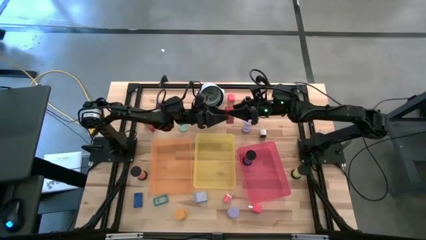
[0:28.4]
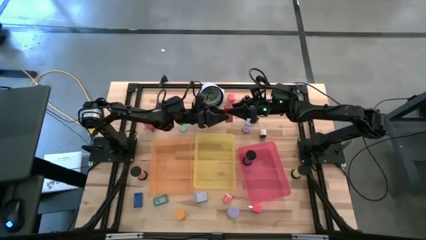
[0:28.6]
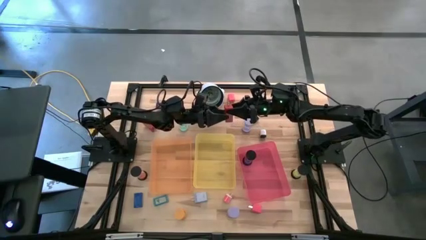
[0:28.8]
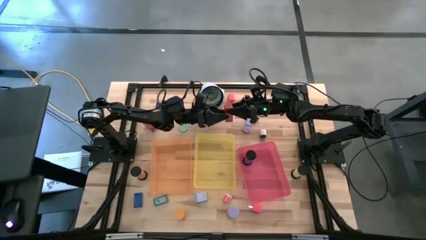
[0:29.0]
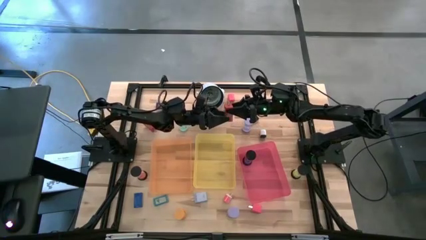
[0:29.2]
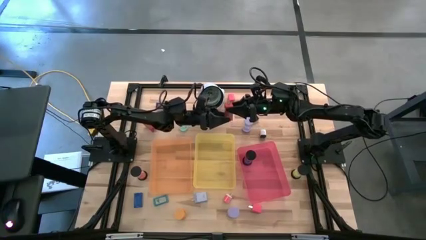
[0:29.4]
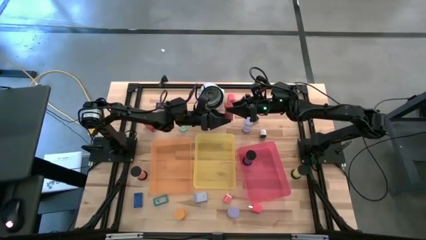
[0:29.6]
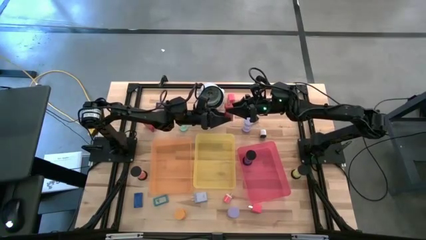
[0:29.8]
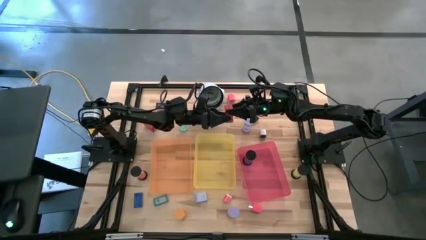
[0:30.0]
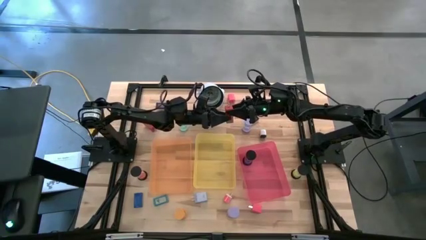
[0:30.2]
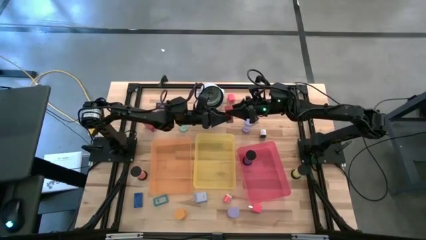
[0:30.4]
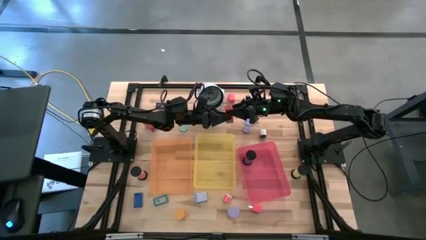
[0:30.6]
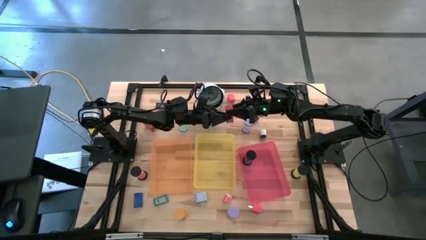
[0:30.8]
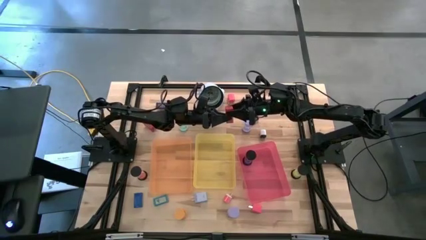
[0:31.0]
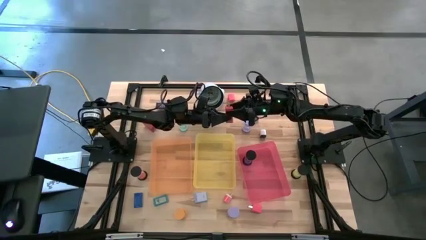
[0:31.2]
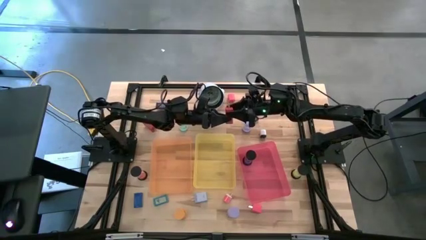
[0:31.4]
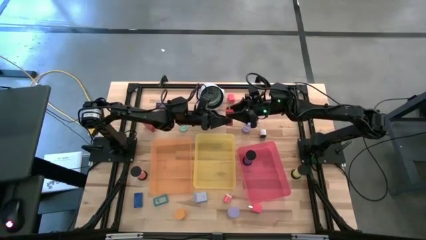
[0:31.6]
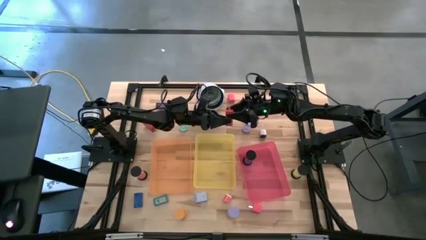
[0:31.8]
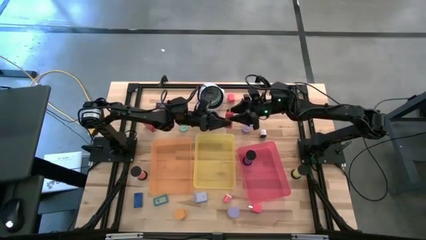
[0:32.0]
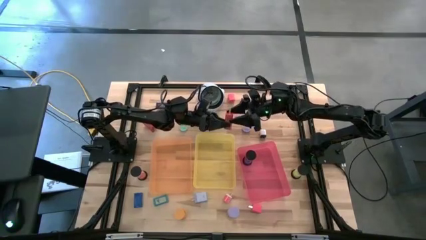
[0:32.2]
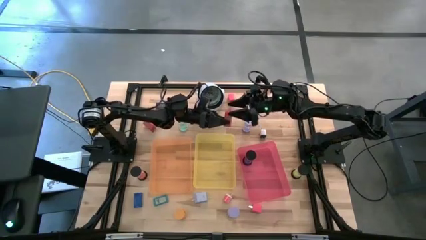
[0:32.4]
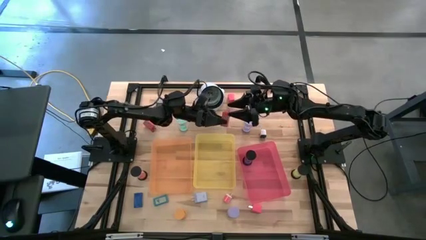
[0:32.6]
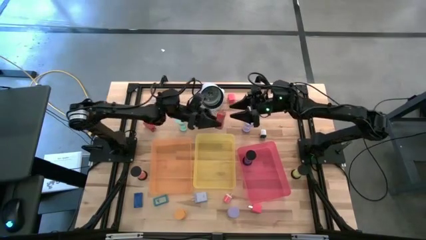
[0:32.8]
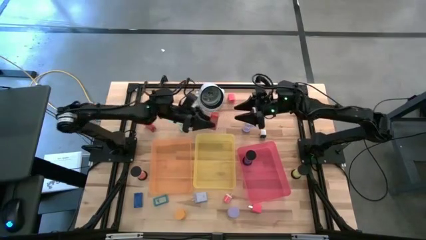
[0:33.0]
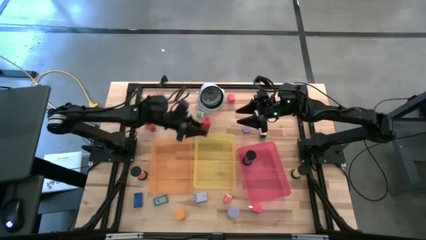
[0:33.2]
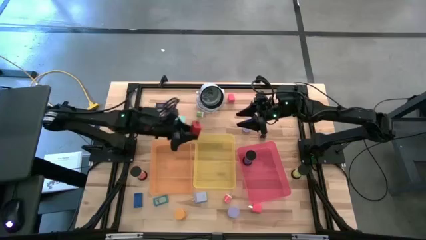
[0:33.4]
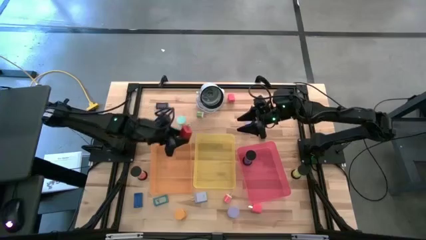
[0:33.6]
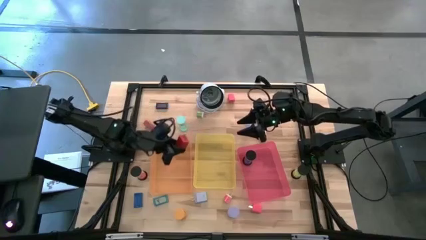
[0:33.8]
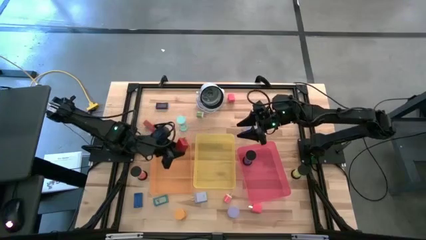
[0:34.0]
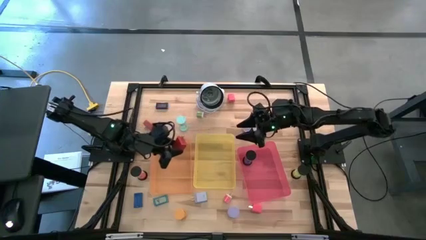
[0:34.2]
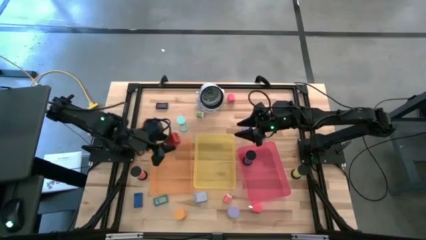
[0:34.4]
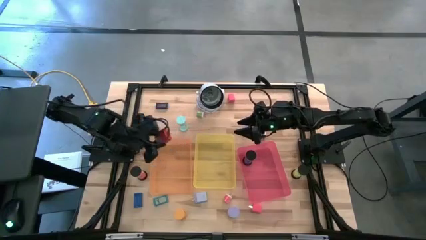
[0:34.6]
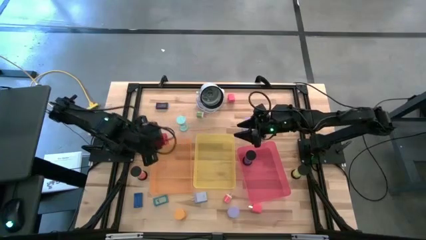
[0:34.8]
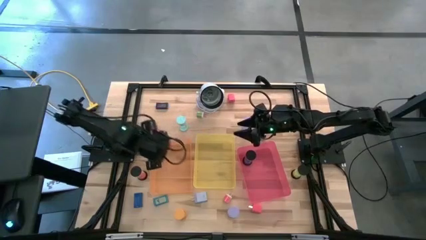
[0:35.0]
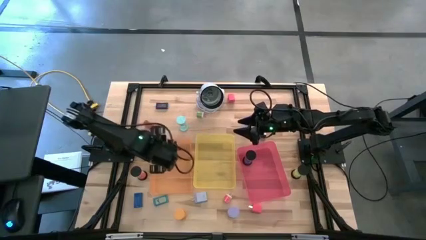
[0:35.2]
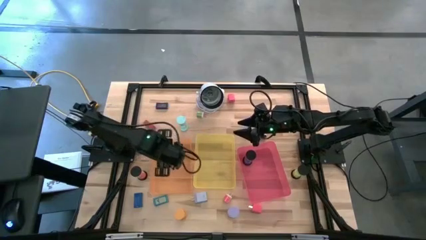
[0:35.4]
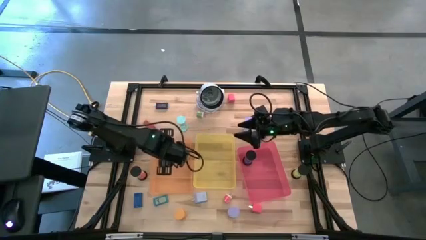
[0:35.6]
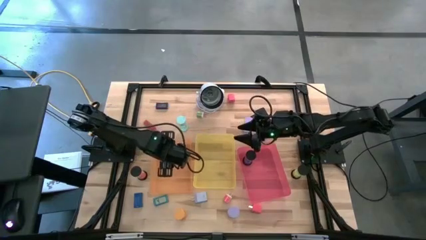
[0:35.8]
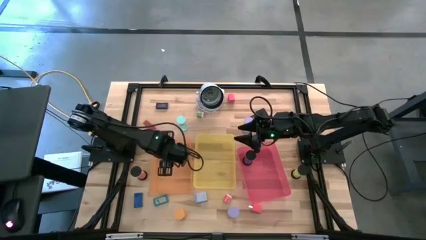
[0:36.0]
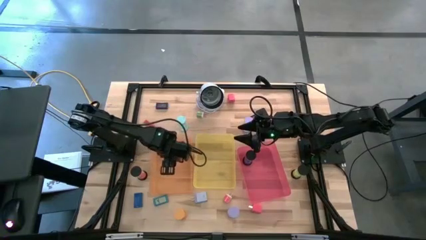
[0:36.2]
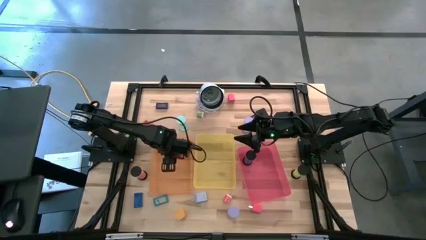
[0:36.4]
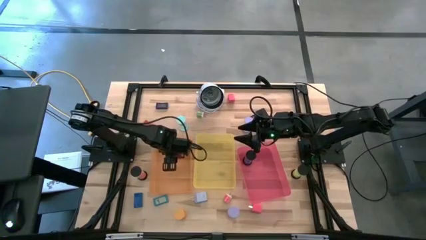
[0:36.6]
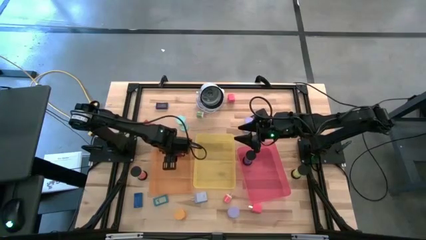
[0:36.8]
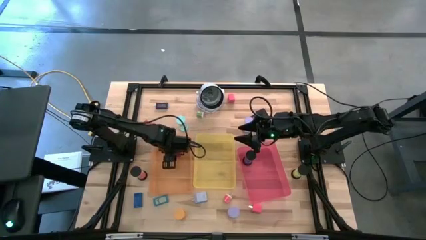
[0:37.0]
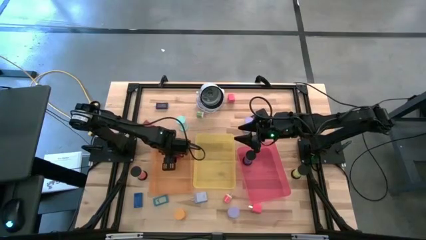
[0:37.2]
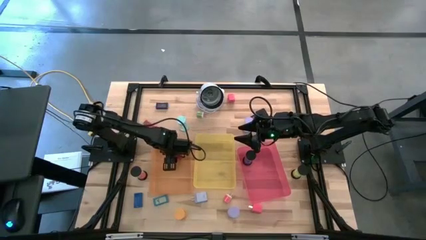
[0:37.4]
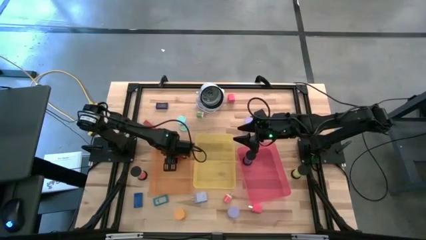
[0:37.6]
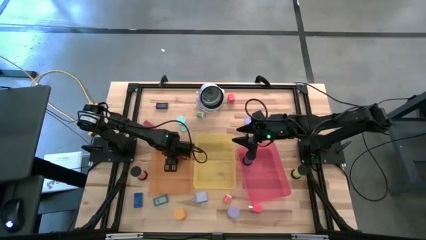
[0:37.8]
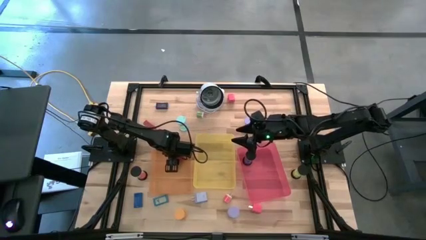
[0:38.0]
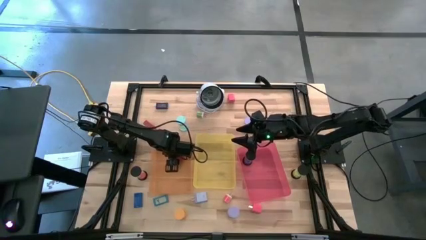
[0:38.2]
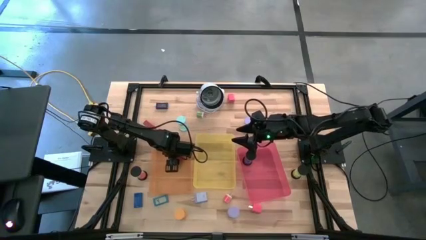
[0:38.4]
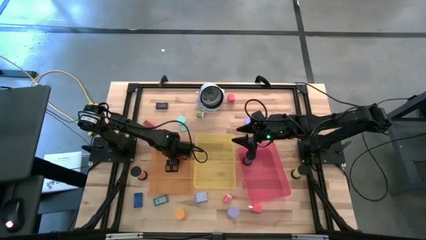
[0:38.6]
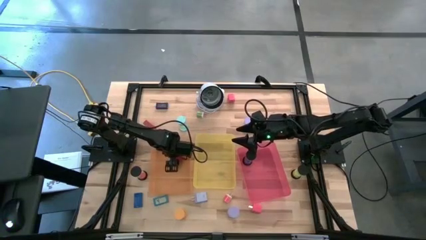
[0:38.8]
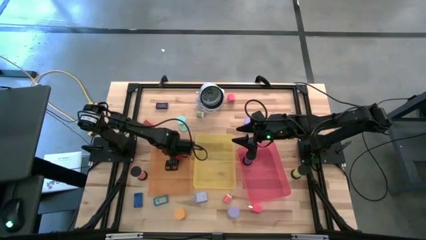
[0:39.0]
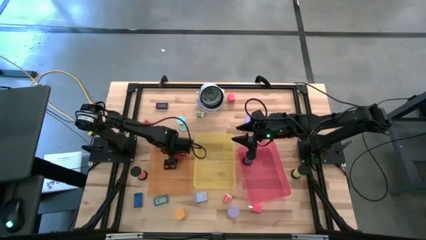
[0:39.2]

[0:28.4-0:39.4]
Task: Pick & Place Office items
Put the red charger adaptor into the orange bin
